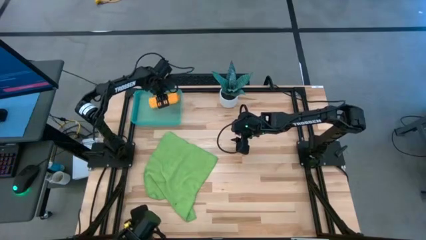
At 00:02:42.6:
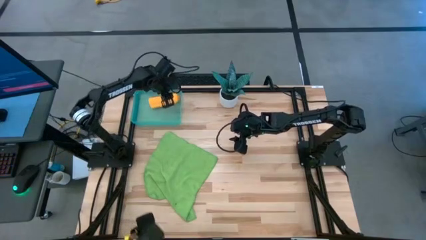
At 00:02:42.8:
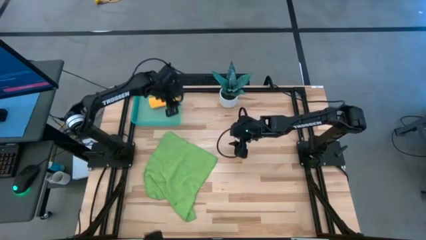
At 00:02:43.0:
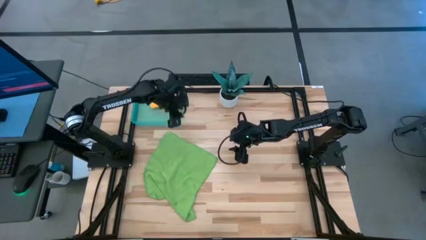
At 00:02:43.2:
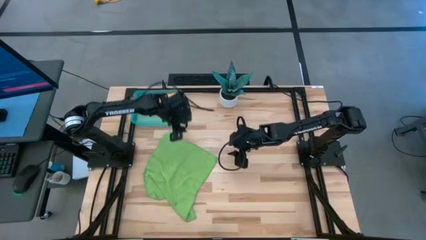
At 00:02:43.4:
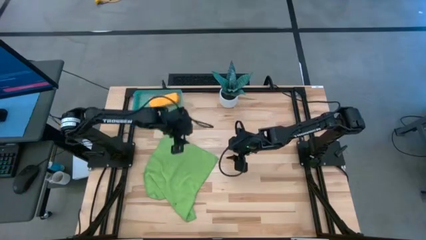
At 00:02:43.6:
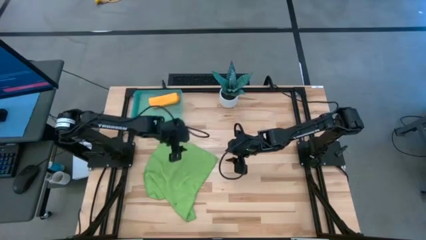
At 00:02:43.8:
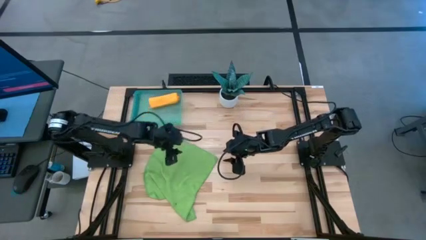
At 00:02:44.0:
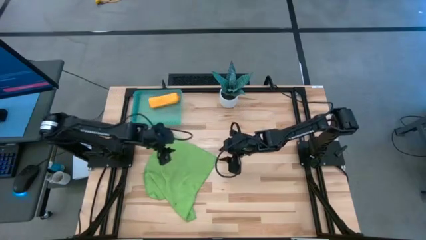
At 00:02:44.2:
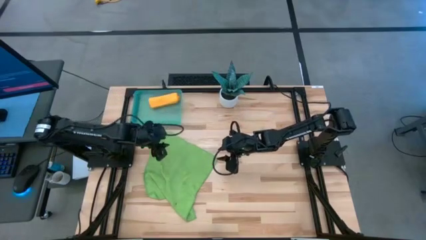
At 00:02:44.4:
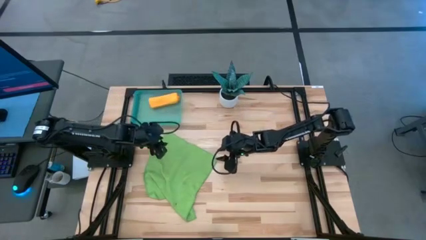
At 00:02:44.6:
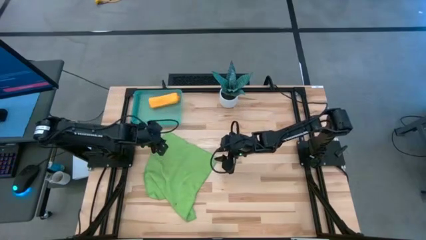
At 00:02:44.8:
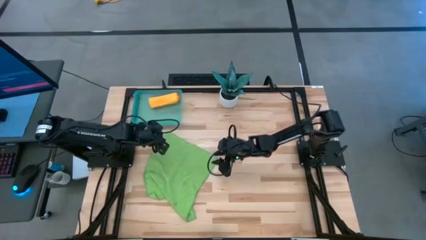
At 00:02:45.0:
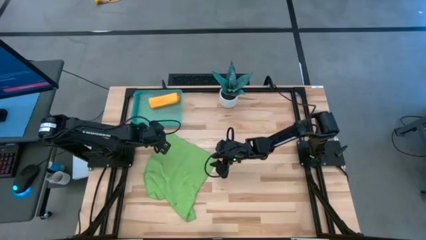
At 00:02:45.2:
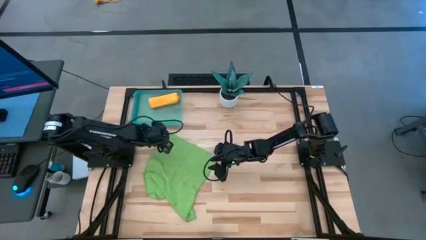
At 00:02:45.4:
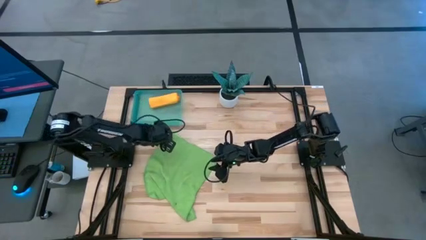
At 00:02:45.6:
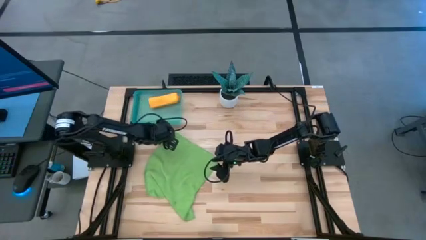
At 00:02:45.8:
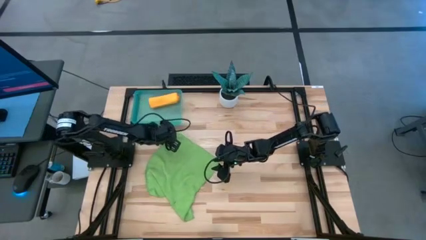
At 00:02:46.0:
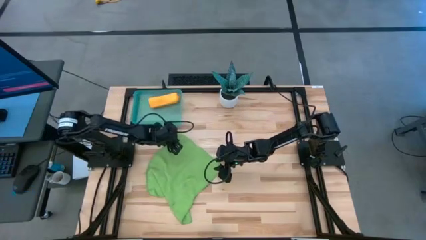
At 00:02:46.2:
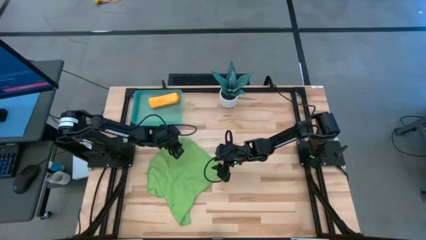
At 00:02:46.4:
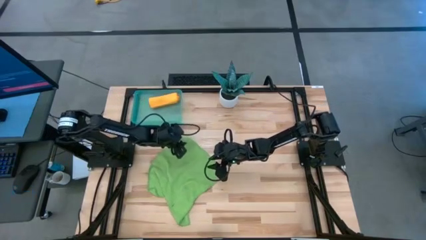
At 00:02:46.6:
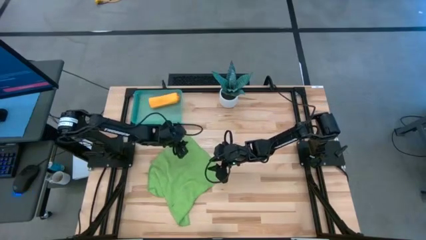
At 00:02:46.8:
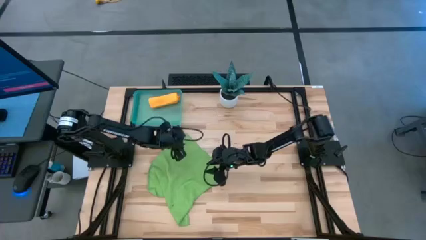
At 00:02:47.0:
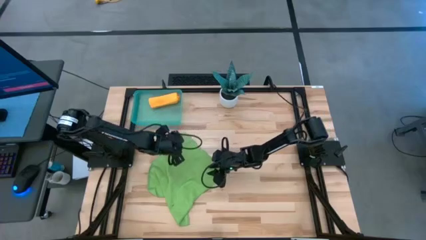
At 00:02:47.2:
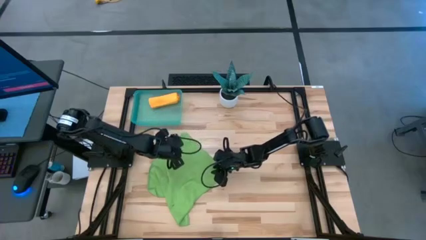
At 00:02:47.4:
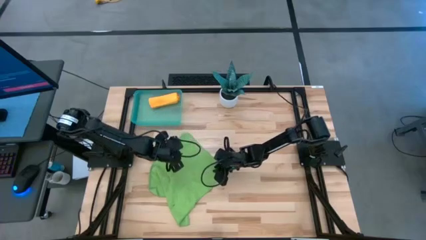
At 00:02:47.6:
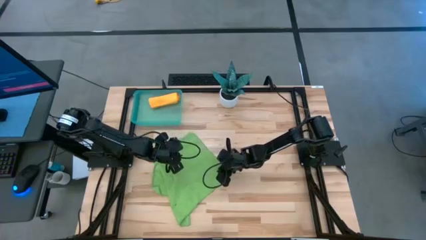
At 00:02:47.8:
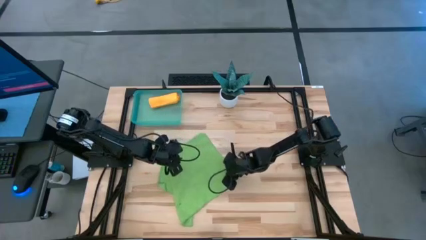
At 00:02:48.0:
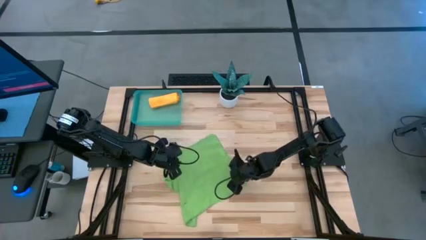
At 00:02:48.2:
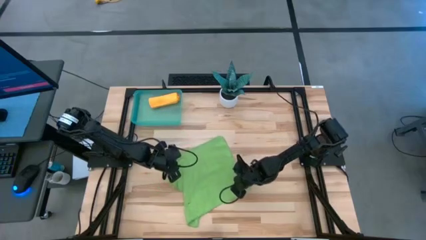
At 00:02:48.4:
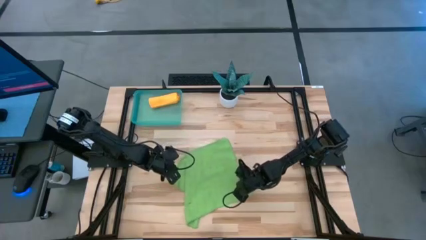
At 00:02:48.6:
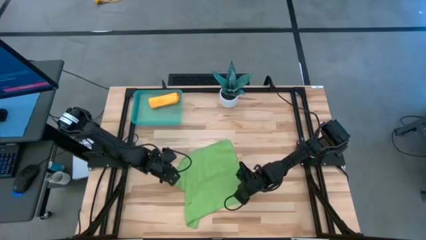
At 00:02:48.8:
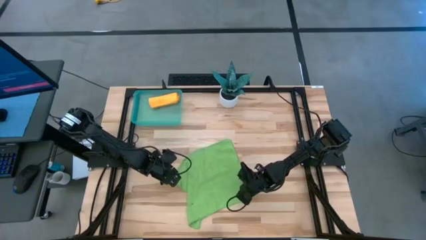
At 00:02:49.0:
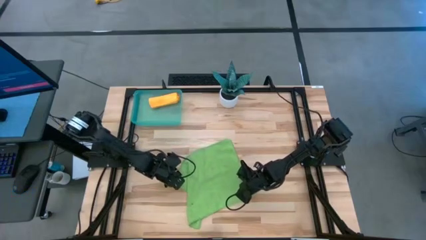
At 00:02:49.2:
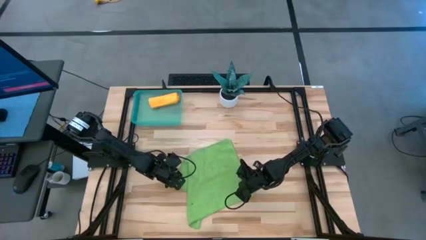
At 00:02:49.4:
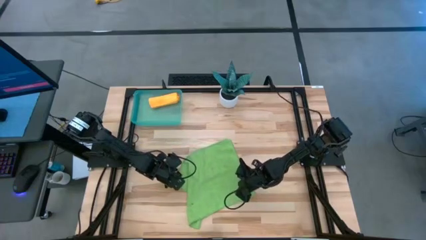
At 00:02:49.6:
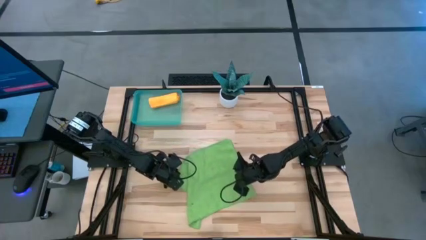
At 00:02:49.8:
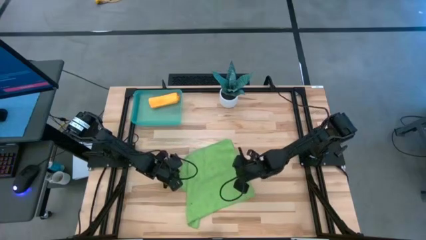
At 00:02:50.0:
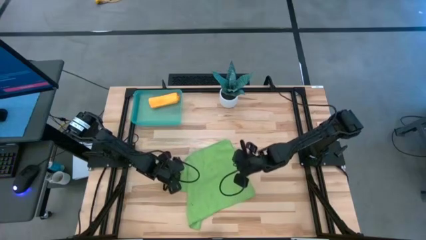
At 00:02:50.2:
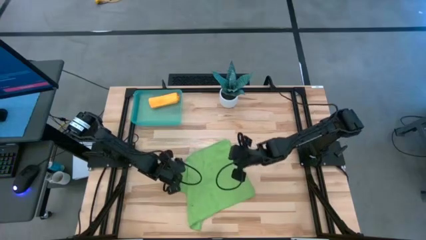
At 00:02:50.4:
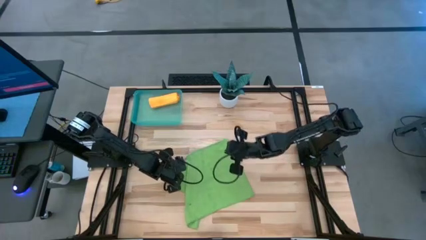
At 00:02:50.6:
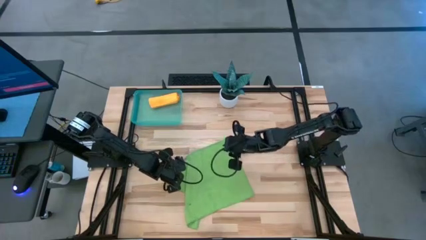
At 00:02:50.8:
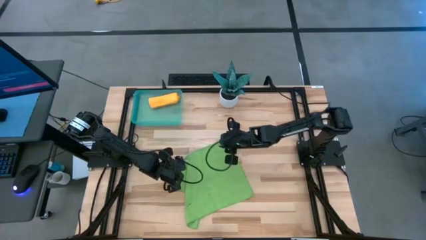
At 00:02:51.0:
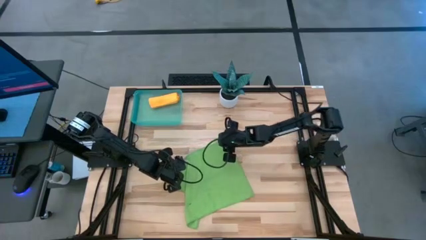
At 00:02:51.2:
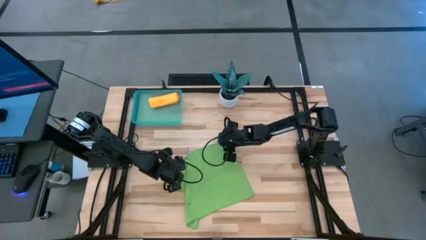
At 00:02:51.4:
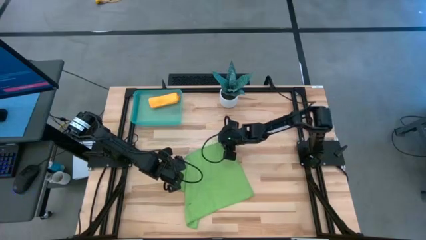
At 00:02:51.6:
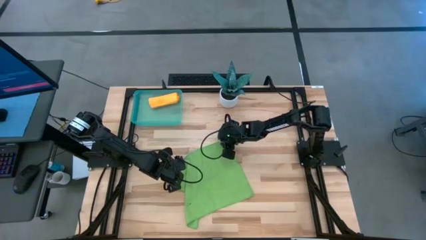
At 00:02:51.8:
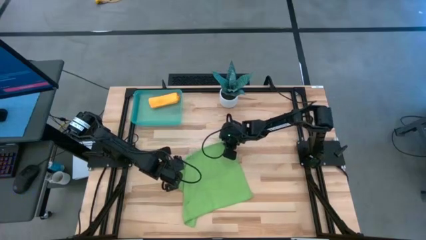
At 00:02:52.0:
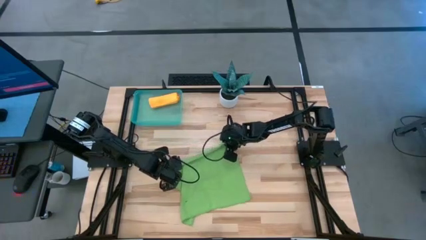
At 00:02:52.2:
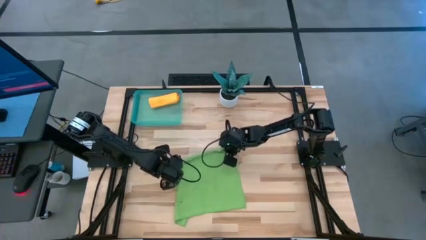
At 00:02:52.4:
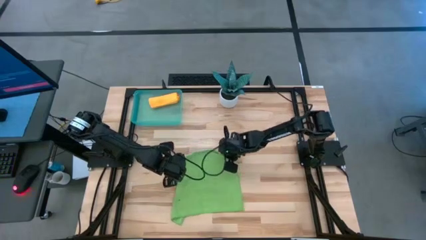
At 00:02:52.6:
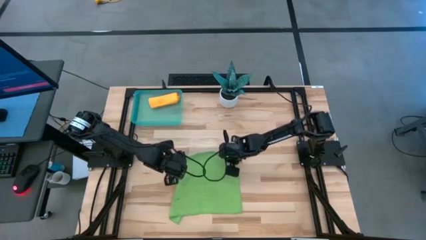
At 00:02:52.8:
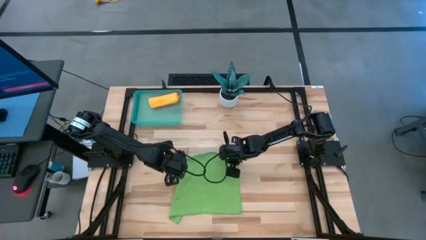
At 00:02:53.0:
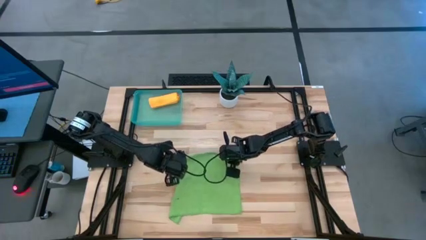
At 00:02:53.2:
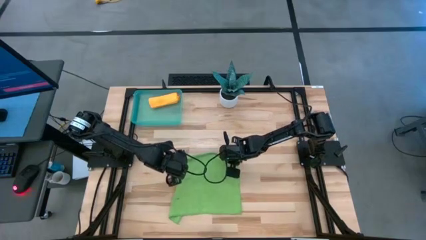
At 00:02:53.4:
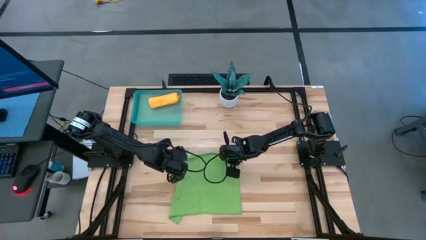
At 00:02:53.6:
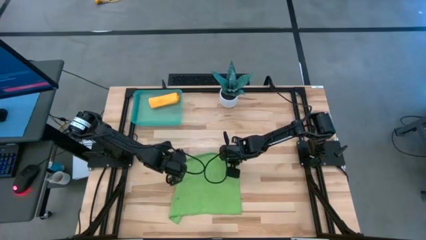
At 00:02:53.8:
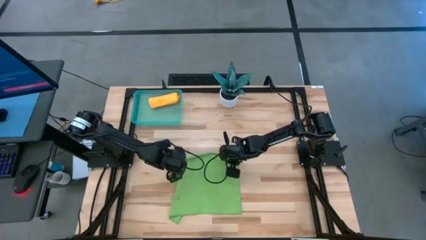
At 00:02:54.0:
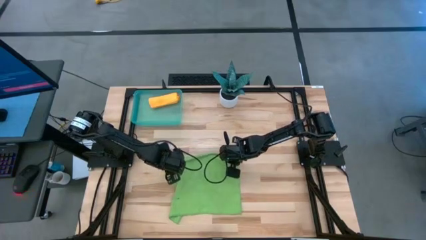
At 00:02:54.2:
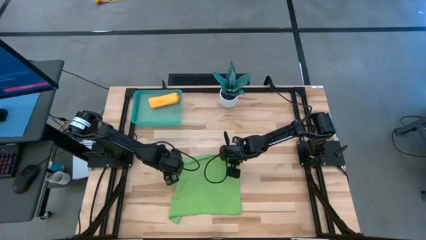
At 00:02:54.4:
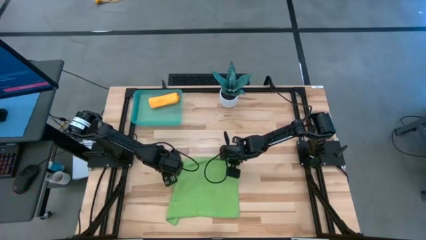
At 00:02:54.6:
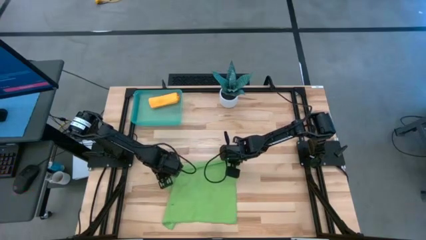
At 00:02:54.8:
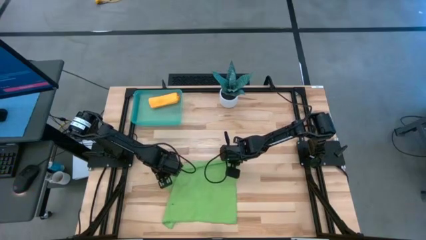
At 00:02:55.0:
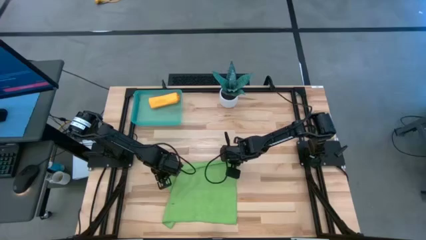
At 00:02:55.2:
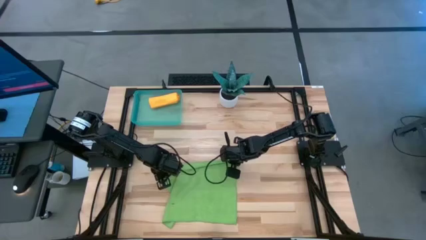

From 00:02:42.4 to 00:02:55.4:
Task: Roll microfiber towels into tight, uniform cylinder then place into a basket
Fold the light green microfiber cloth

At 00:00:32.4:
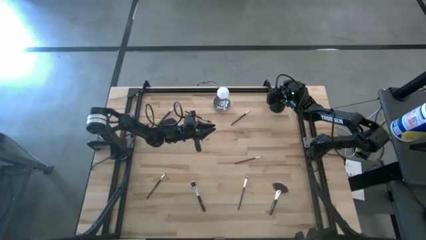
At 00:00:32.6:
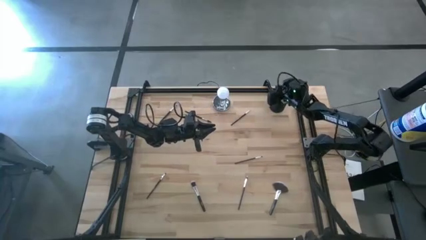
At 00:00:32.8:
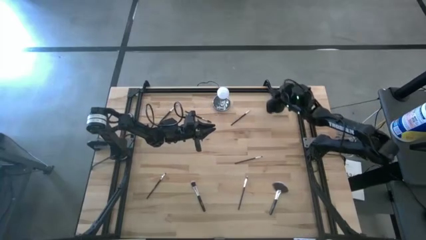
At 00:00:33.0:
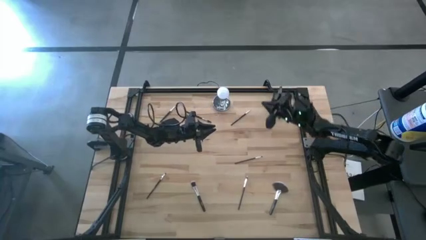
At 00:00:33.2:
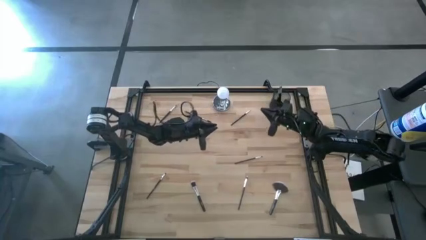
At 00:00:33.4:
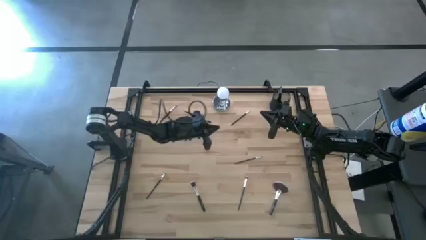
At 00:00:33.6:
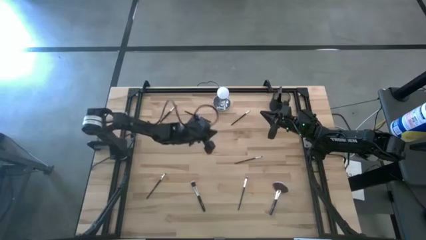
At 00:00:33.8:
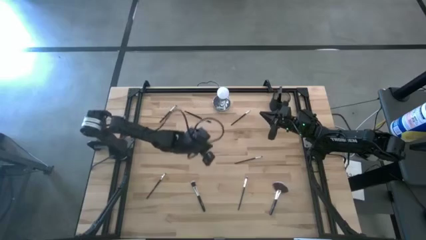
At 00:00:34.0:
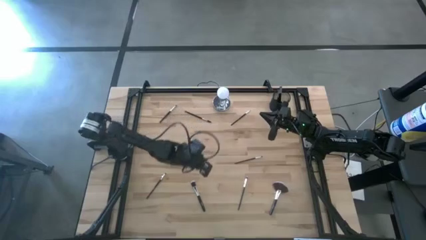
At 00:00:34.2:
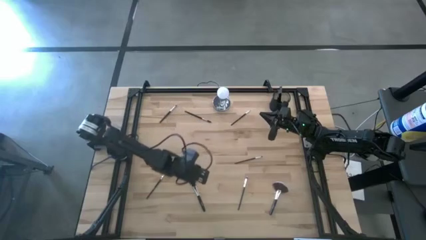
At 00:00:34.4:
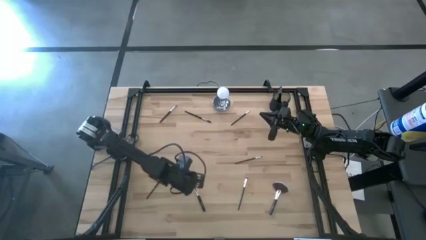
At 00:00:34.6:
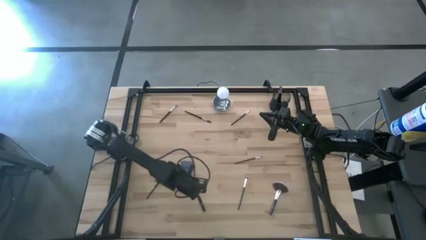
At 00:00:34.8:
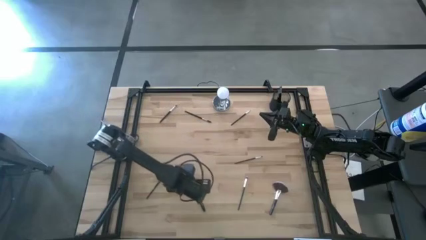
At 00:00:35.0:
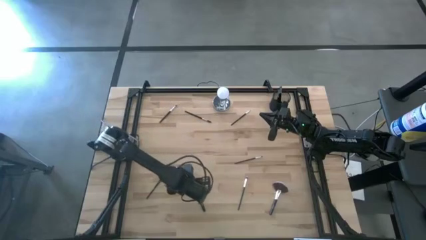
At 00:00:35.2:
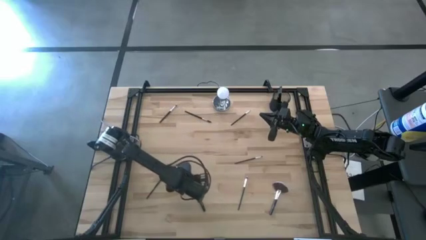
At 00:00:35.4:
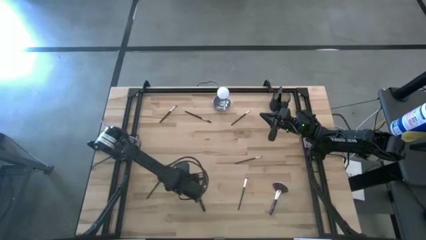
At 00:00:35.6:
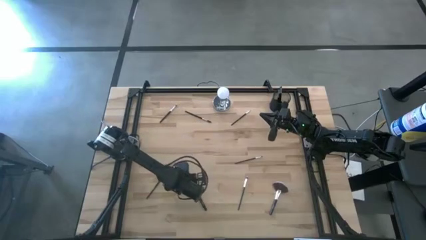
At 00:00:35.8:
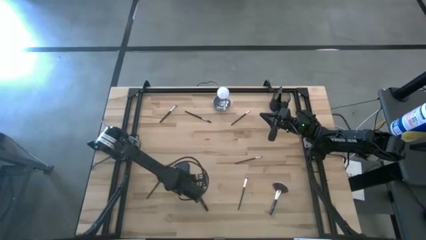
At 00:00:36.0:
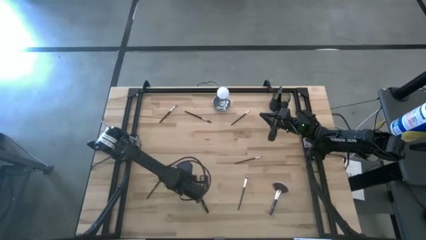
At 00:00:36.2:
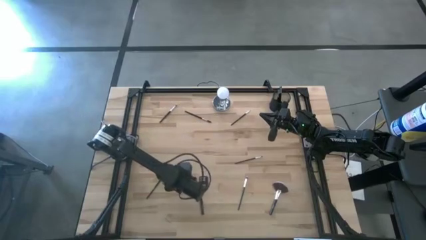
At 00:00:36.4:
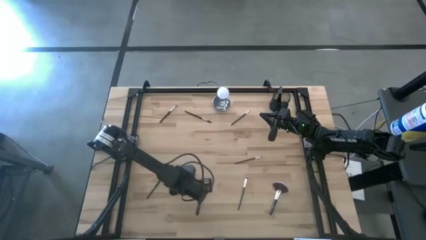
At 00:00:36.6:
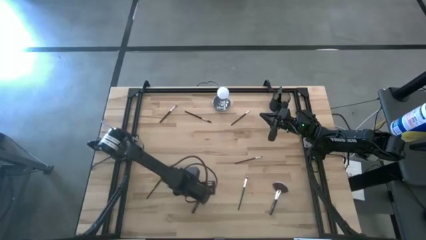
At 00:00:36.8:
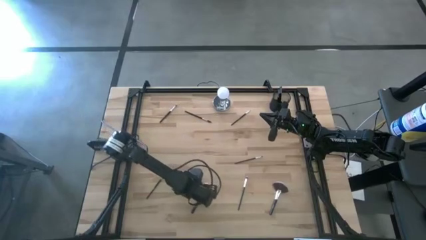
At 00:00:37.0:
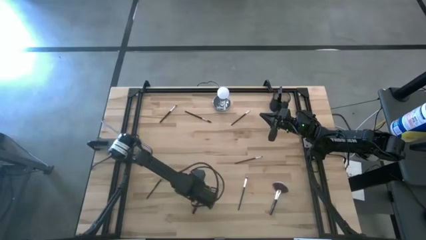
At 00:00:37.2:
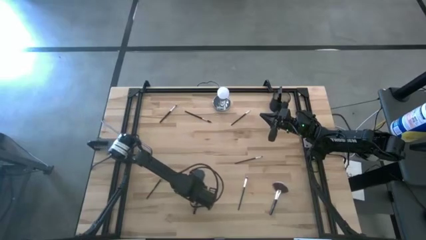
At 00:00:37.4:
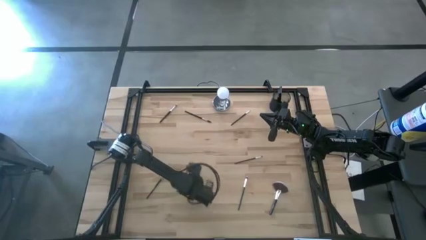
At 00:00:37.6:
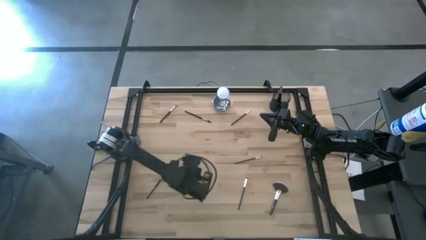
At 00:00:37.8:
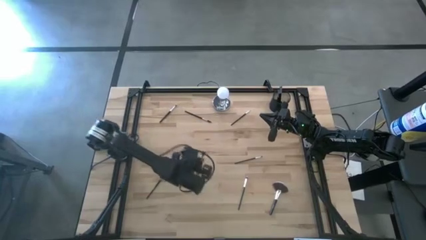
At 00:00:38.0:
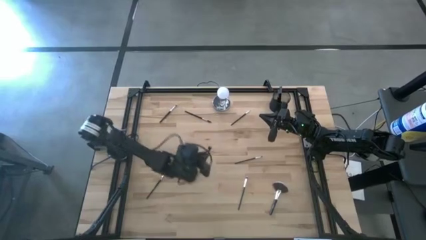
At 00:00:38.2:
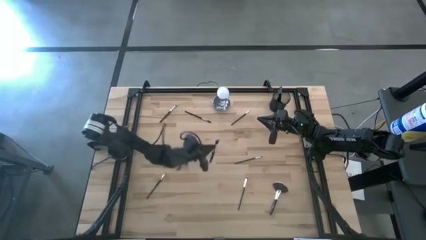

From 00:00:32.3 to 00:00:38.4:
Task: Put items in baskets/containers
Put the black foundation brush into the black pen holder
